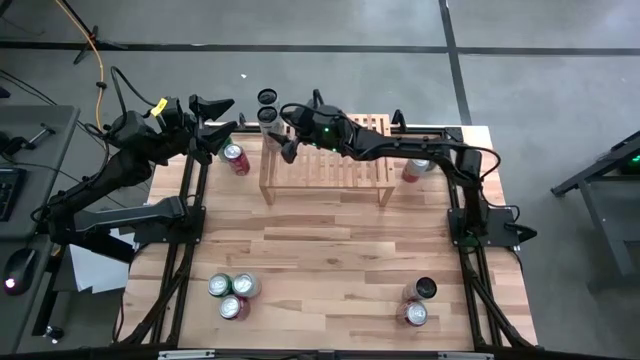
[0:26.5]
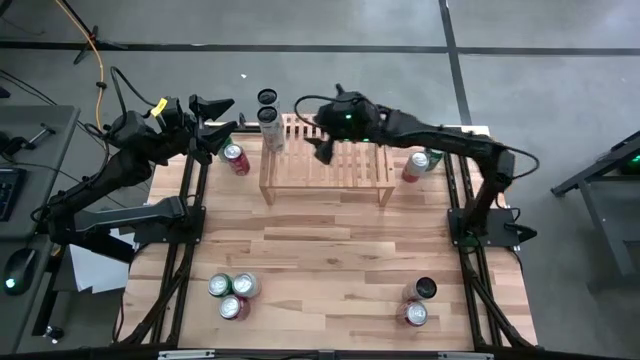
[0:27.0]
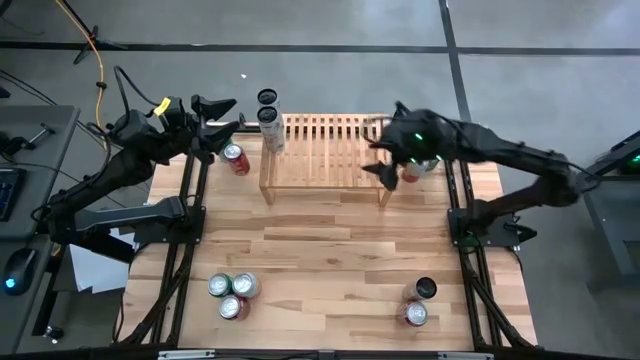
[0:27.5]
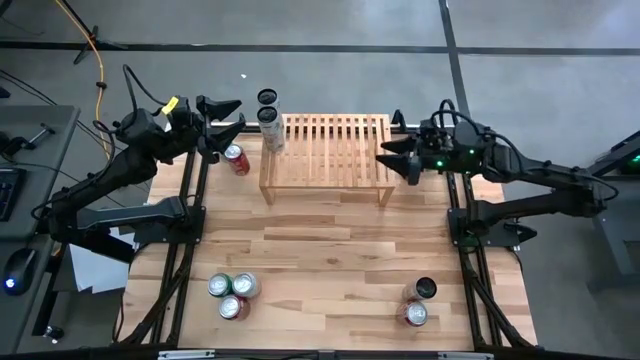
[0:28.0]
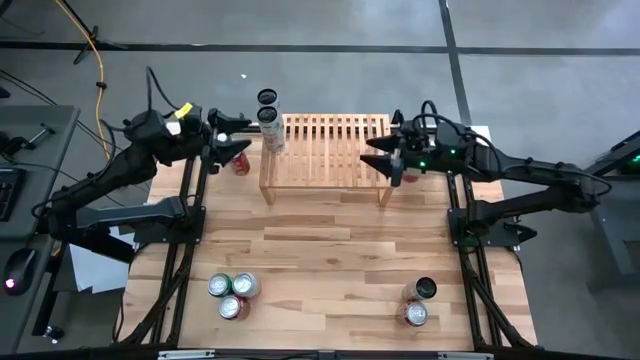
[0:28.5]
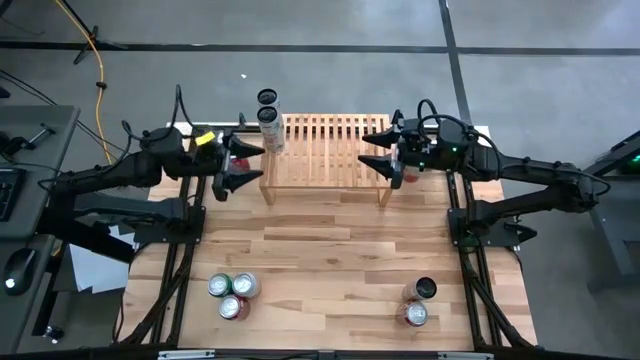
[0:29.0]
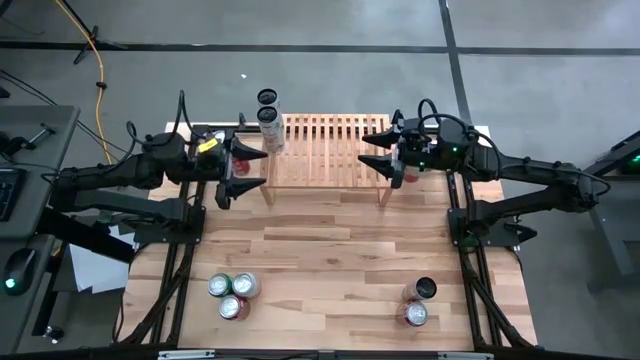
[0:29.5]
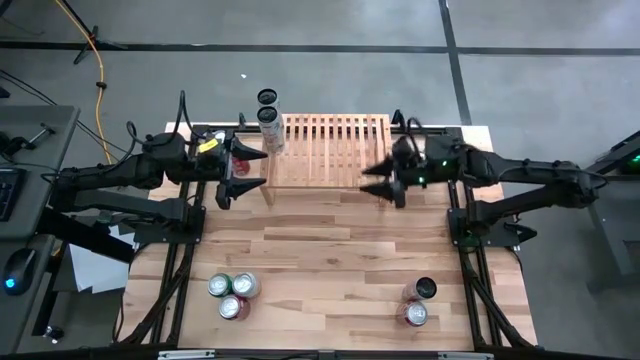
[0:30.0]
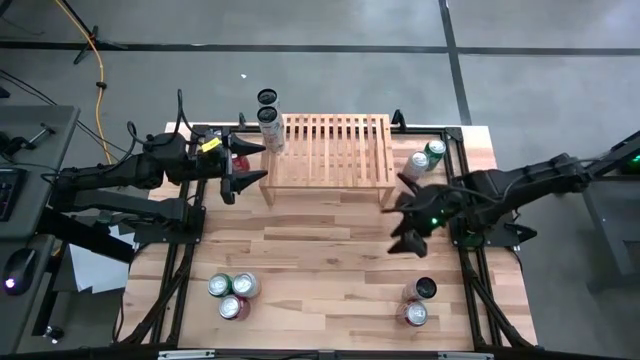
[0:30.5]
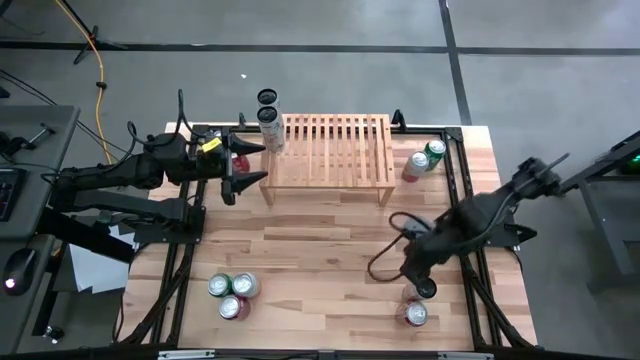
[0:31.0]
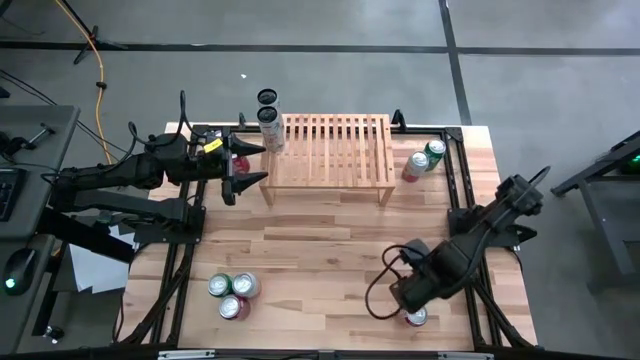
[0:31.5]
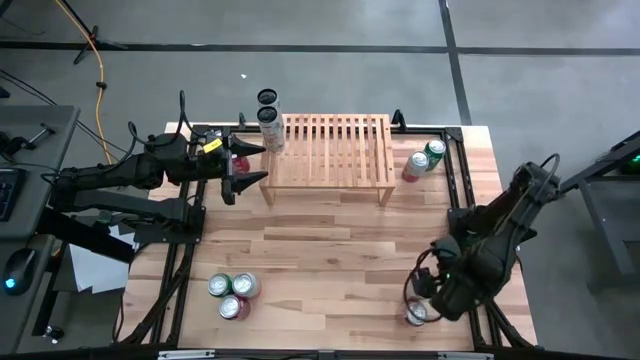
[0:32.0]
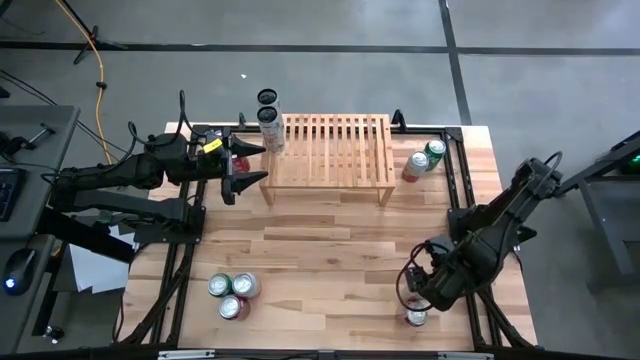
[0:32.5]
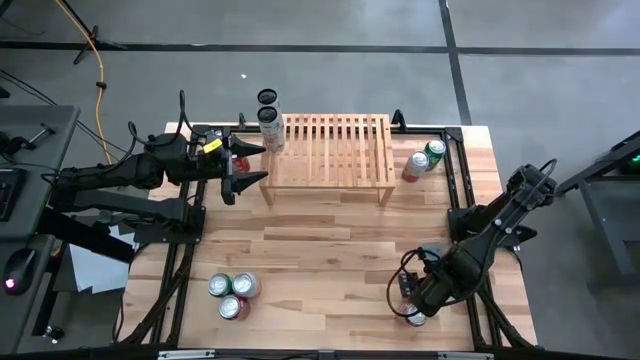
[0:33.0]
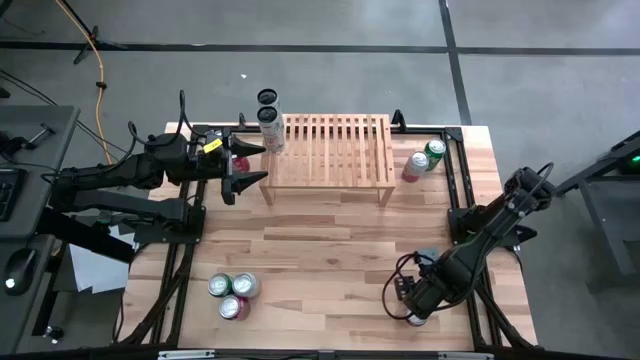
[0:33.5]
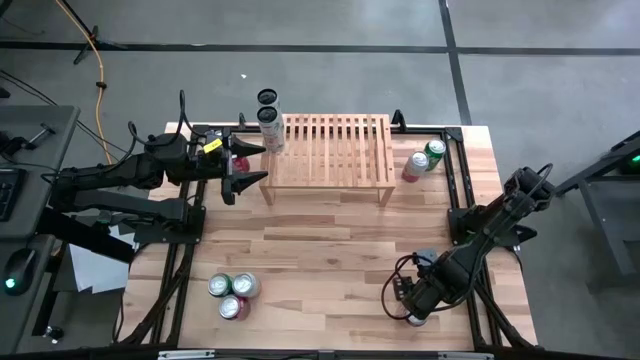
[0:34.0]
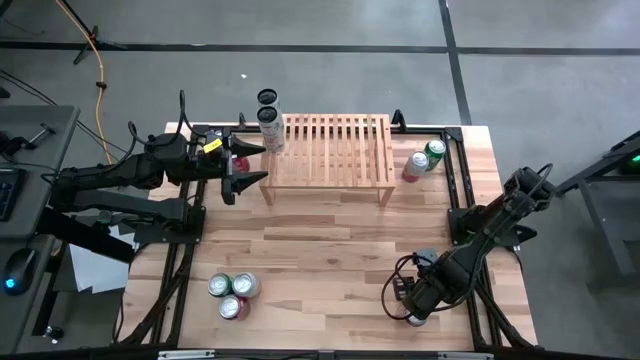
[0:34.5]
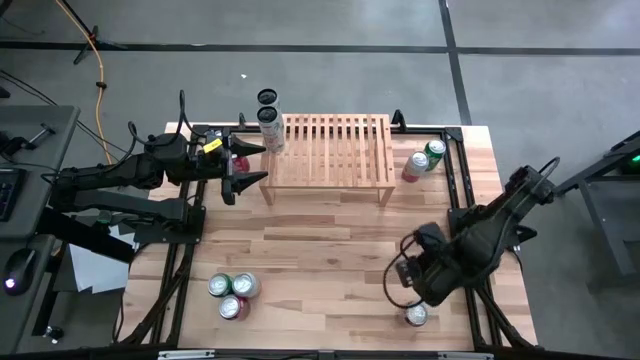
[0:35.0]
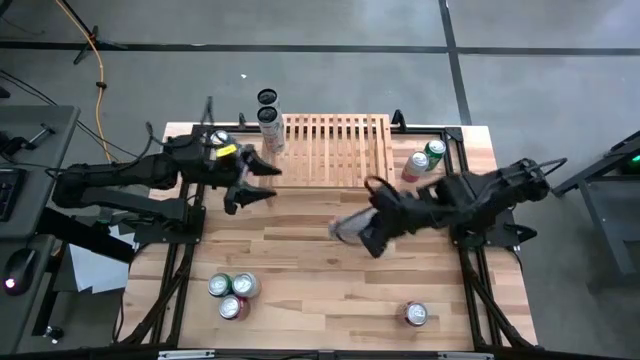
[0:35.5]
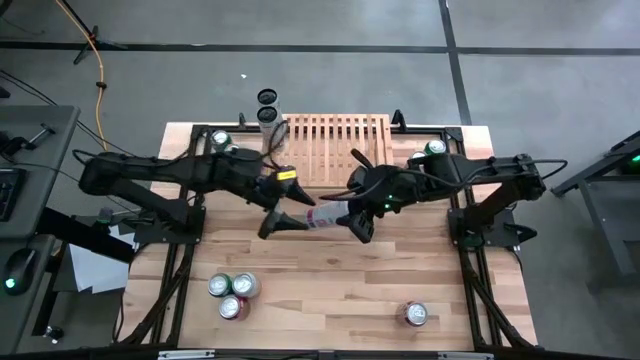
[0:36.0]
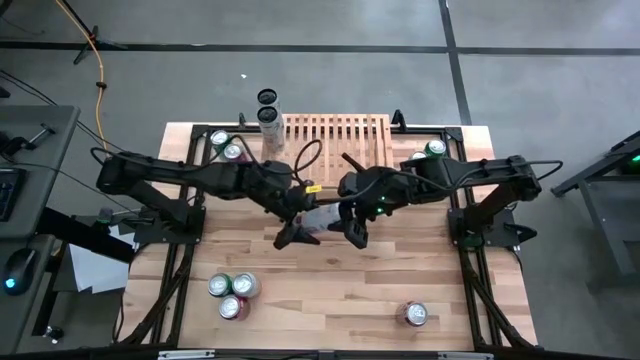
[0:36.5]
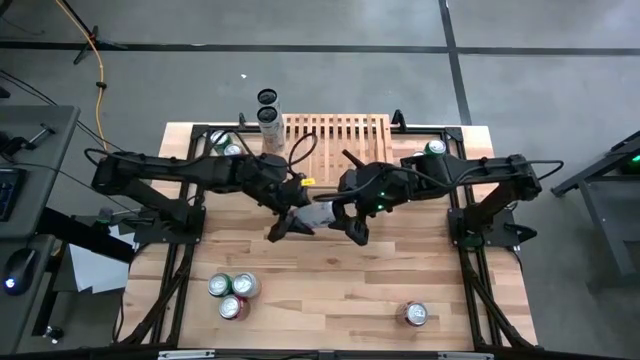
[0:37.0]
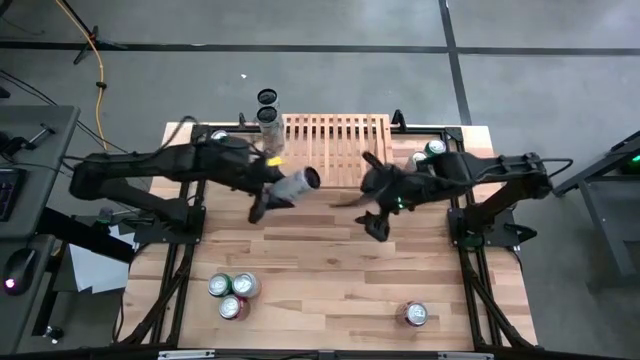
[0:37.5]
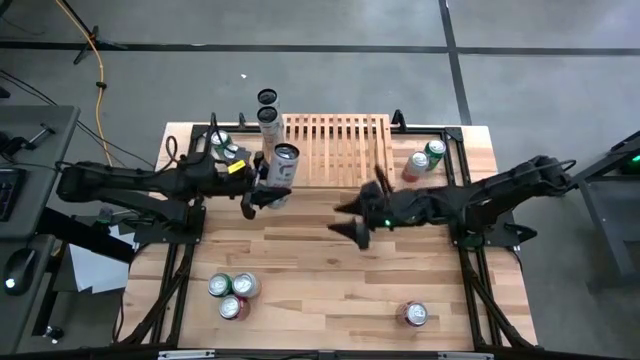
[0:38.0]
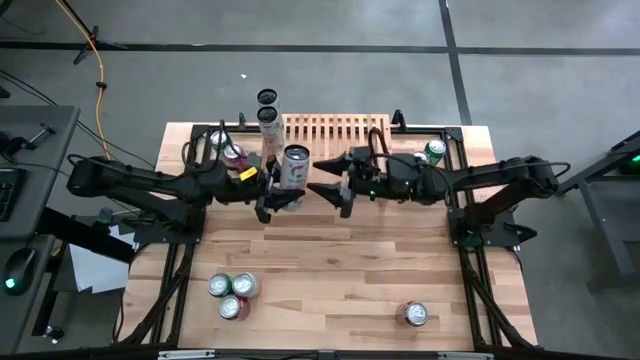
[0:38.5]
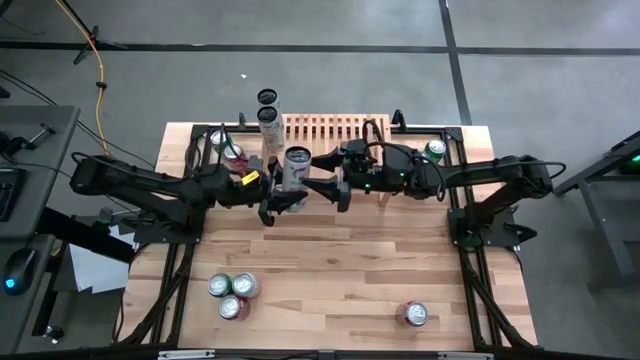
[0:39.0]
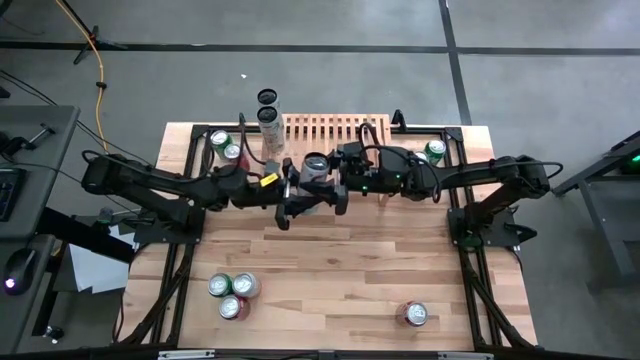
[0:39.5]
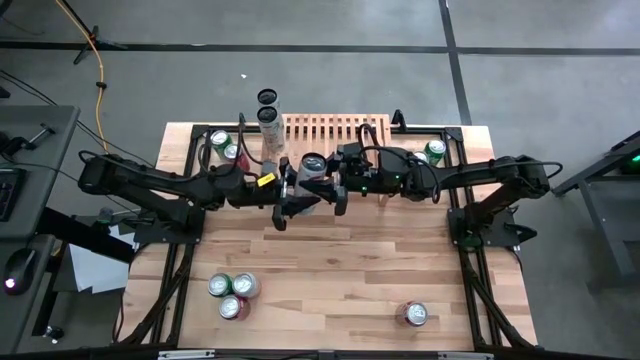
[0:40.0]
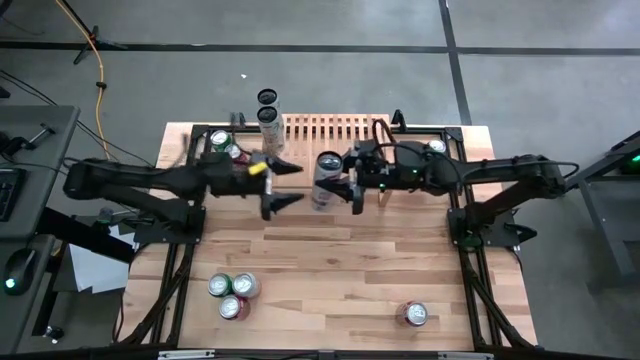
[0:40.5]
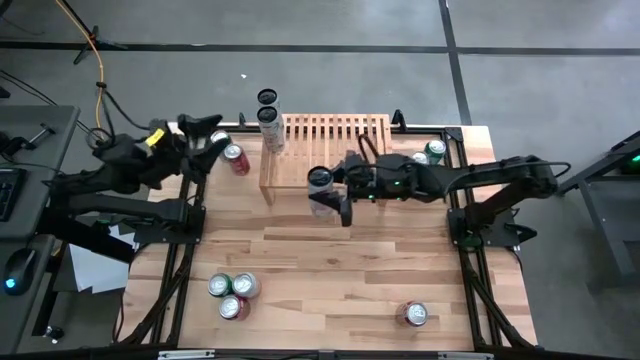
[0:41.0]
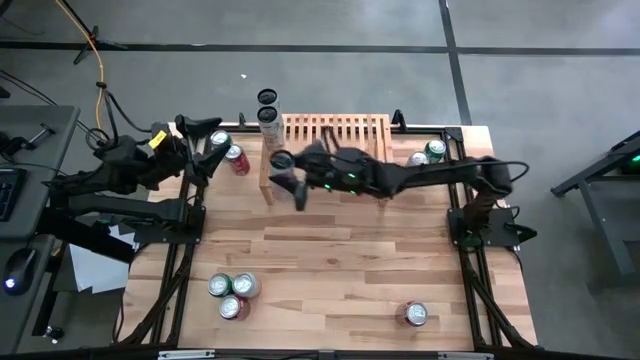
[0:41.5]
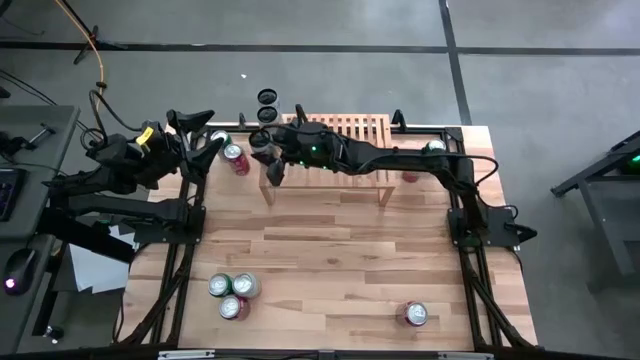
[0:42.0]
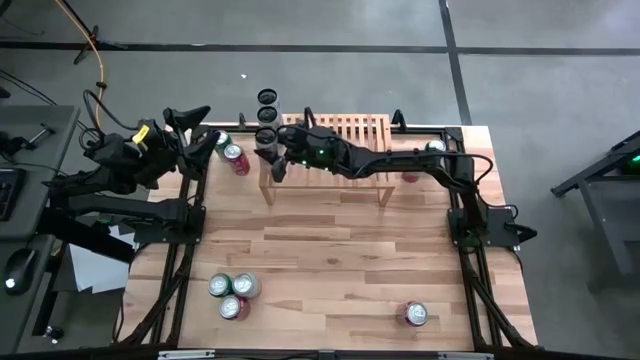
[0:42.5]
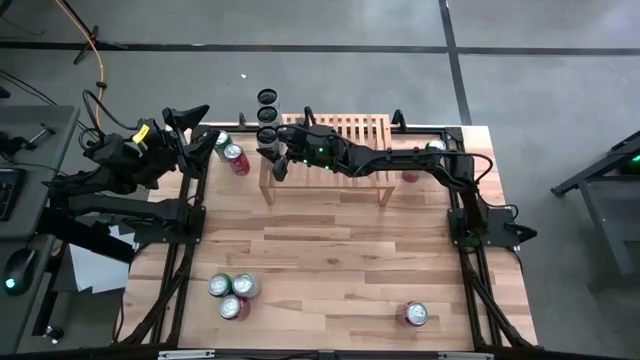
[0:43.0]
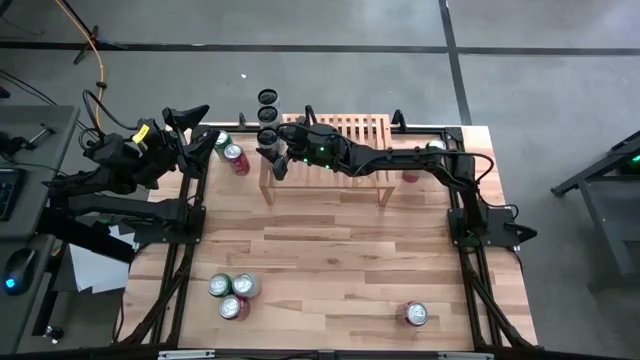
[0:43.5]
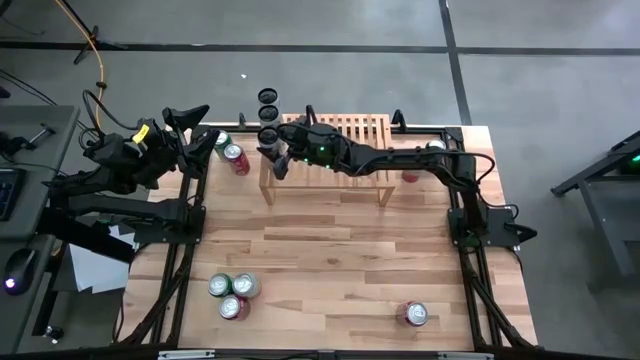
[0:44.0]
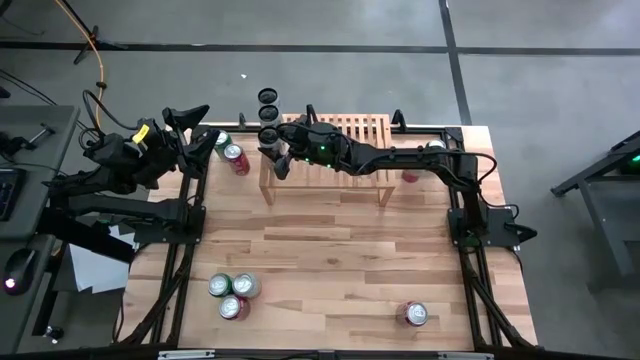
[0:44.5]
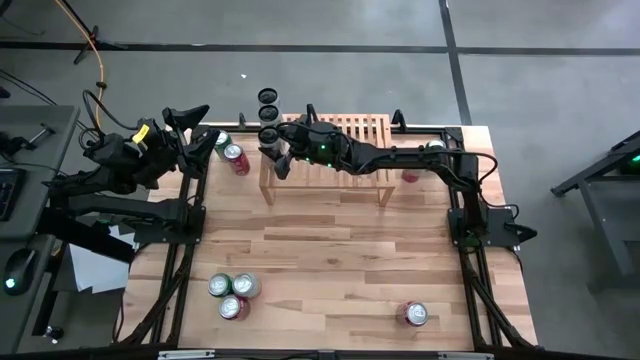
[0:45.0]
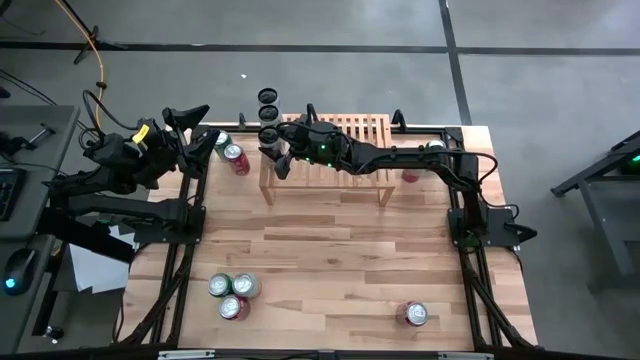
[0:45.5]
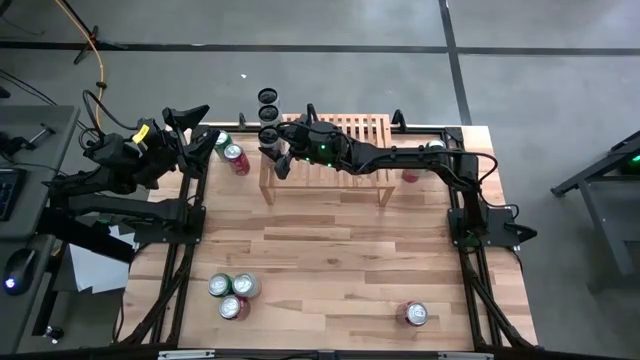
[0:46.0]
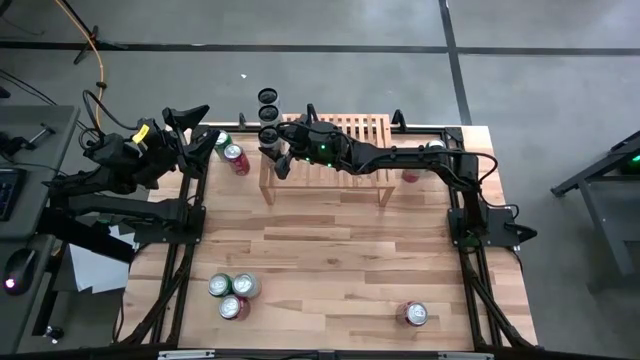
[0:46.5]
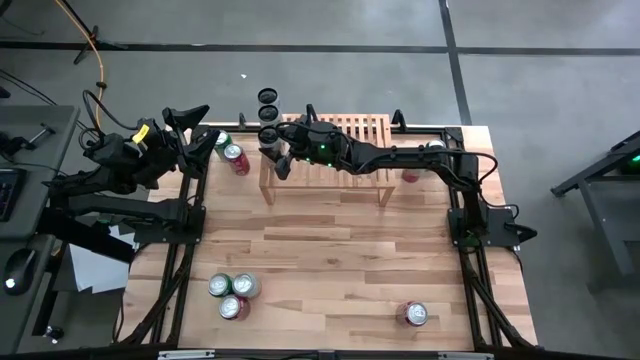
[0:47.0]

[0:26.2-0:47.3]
Task: Place canned beverage on shelf
Put the white-pink soda can on the shelf aligned with the other white-pink soda cans
